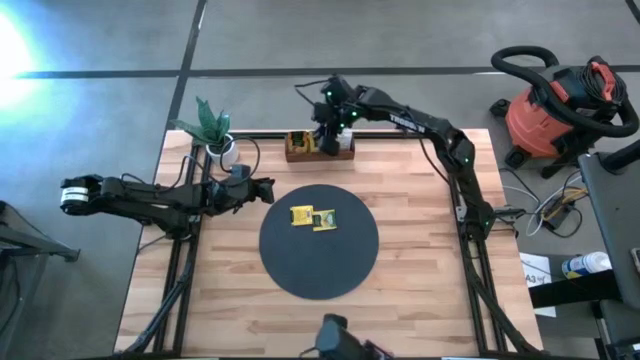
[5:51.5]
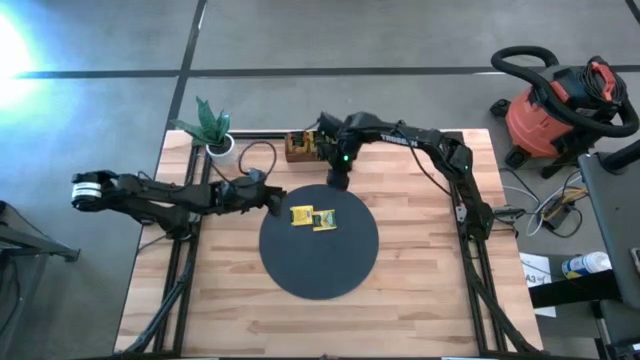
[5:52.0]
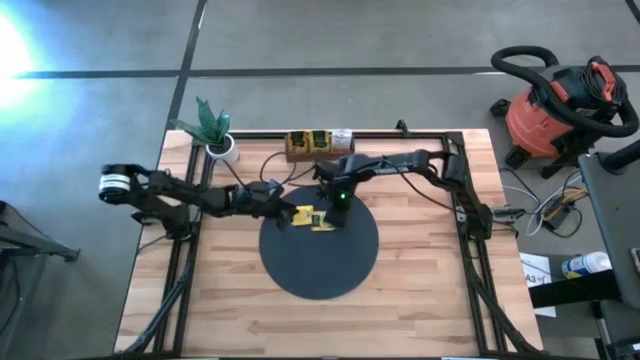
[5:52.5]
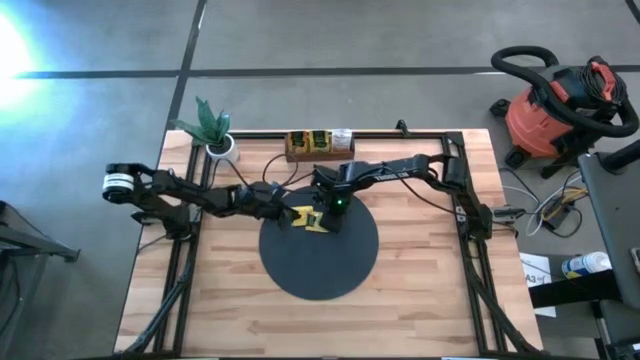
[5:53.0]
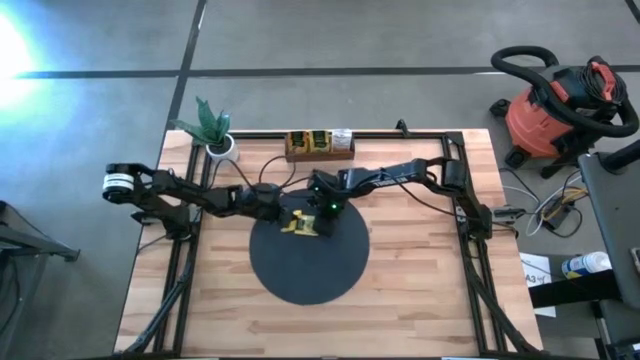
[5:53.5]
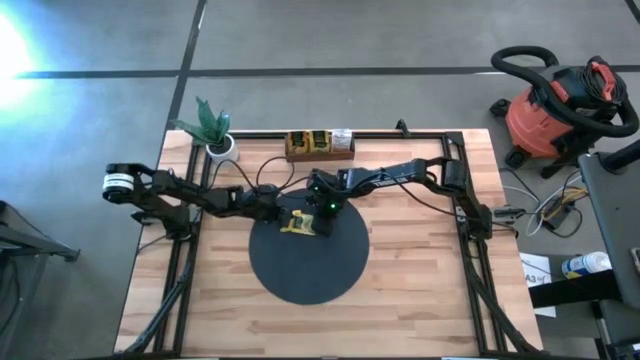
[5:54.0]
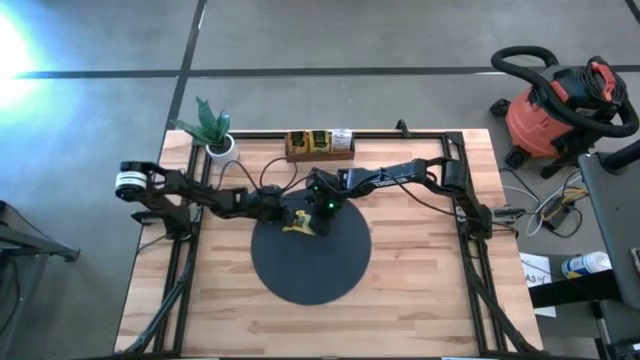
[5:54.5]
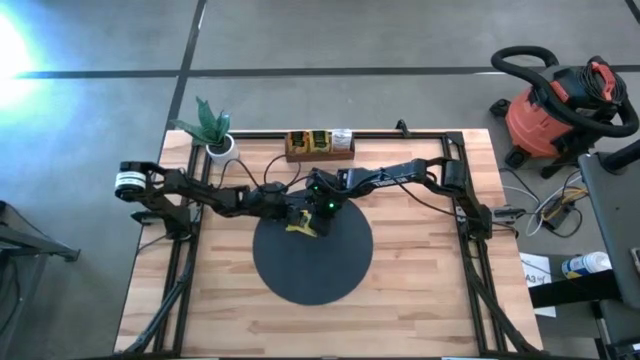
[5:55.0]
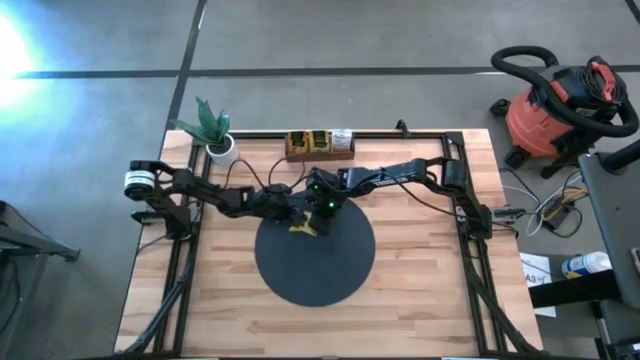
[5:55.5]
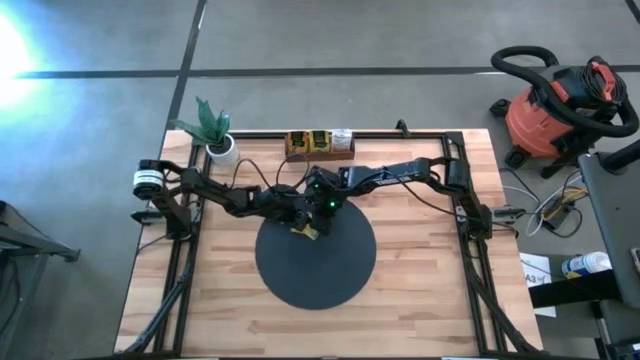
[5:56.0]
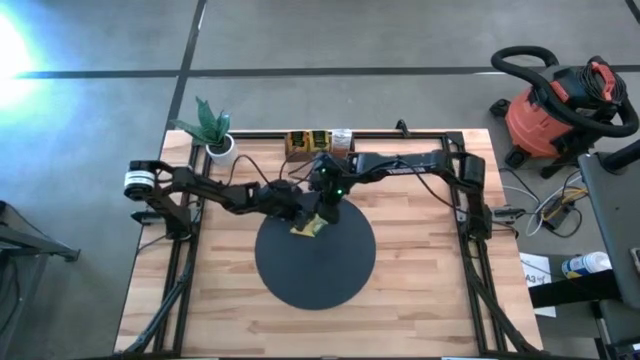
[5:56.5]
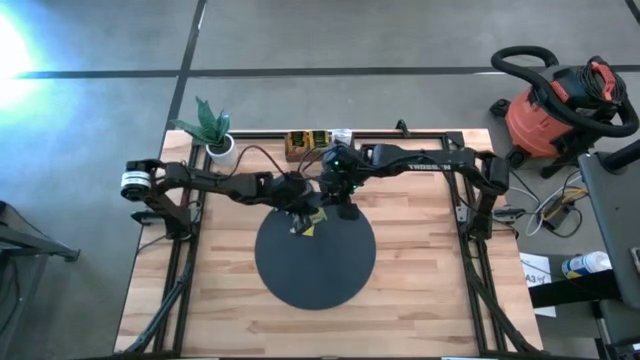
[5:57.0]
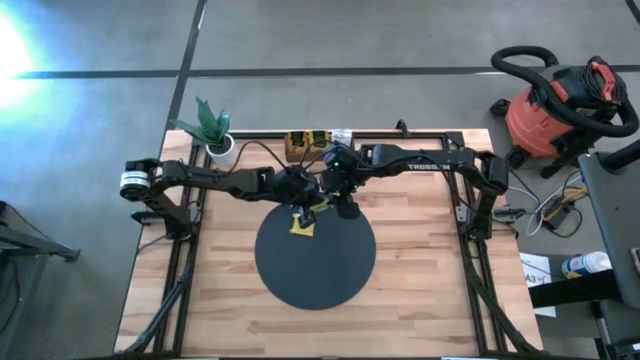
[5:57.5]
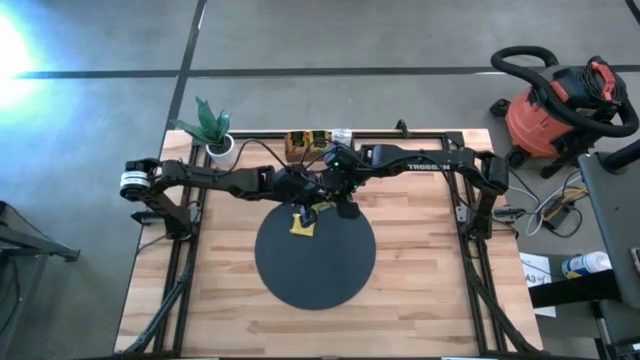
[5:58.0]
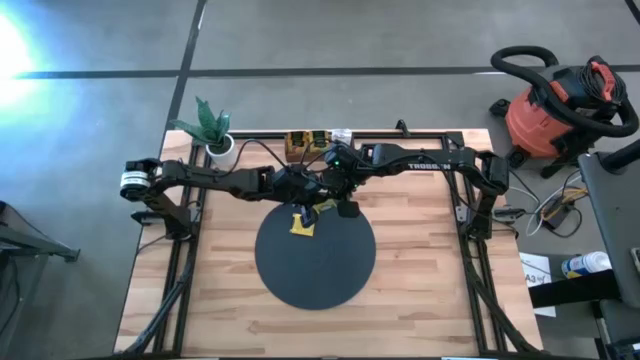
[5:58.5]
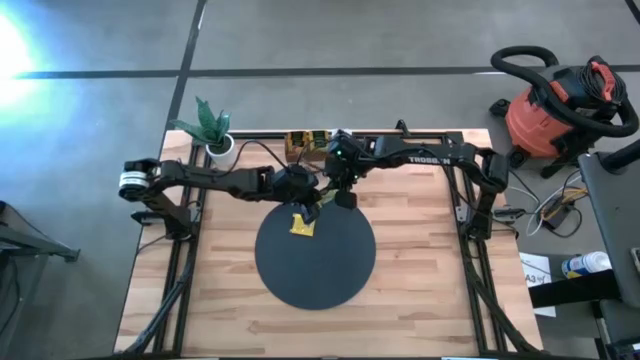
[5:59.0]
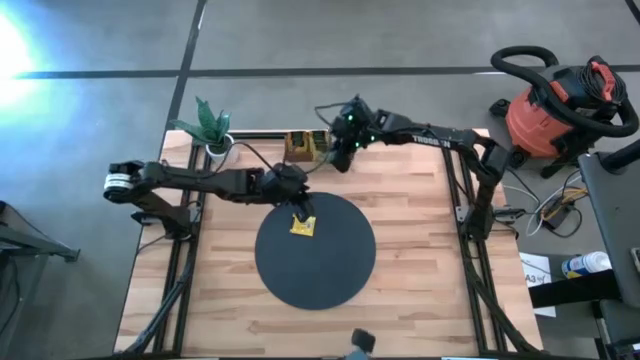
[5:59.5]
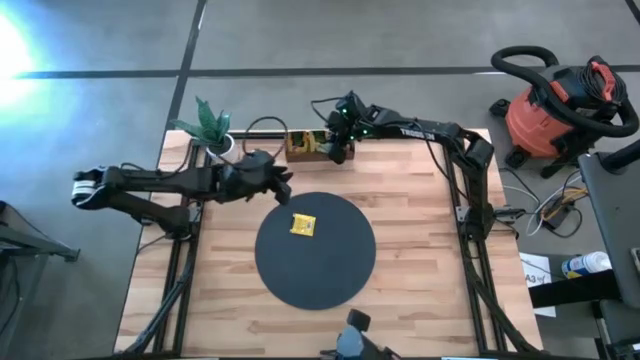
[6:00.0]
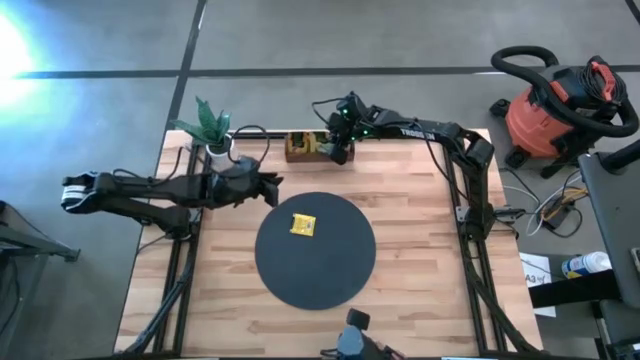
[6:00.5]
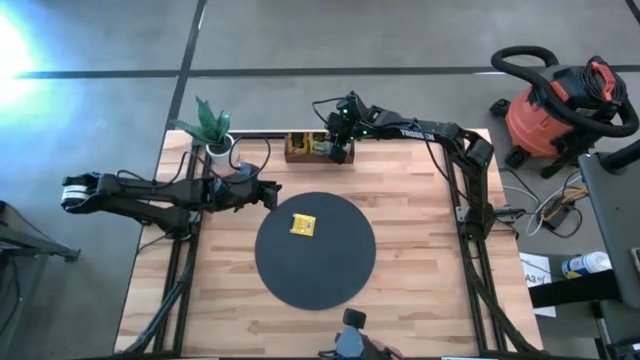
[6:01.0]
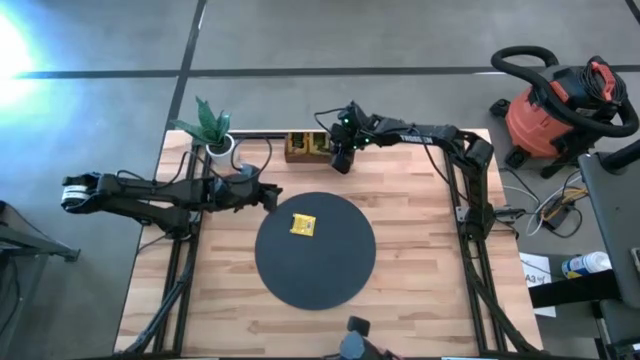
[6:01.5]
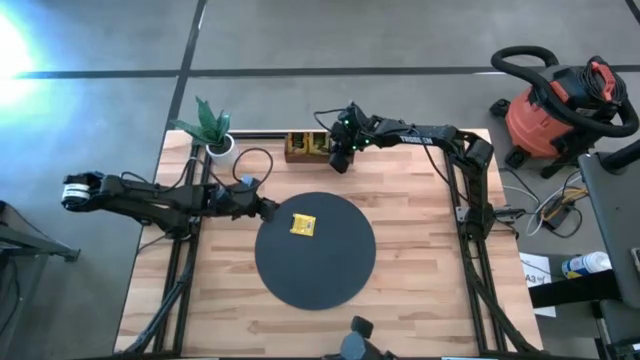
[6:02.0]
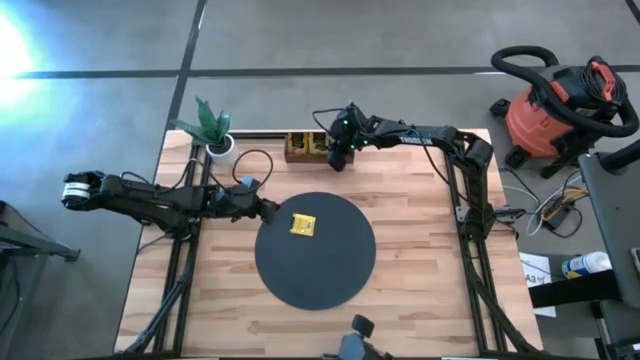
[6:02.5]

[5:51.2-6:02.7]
Task: Pick & Place Tea
Put the yellow tea bag into the middle section of the wooden organizer

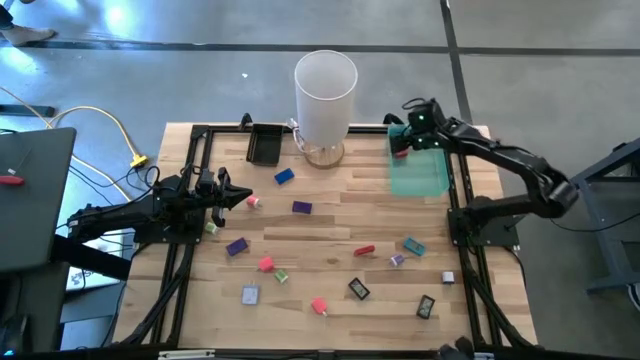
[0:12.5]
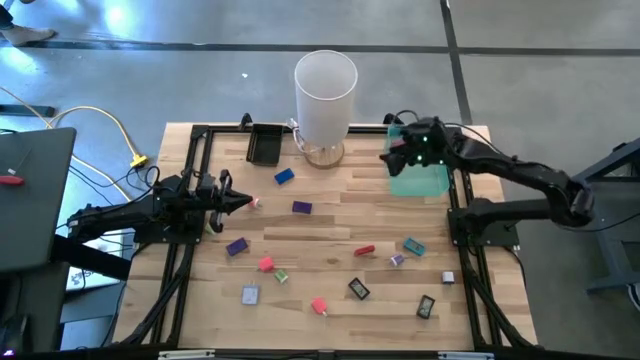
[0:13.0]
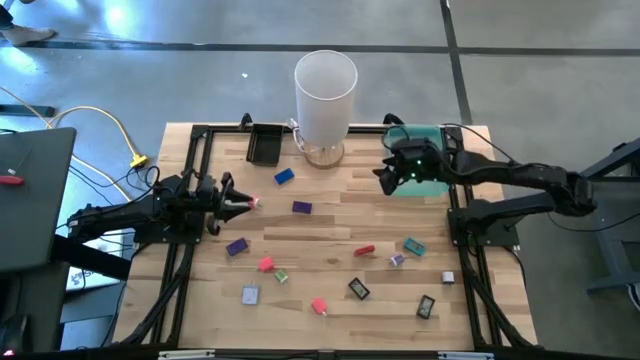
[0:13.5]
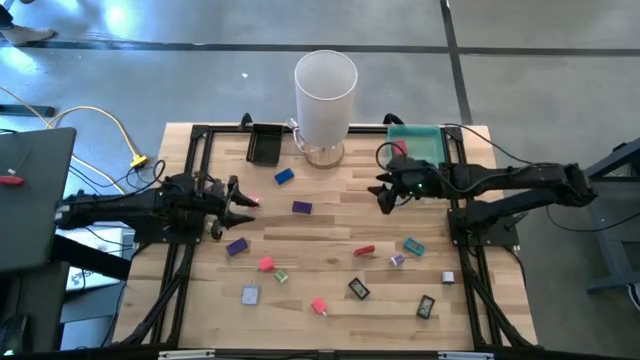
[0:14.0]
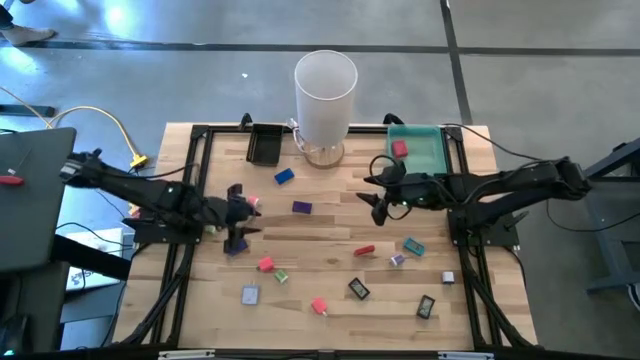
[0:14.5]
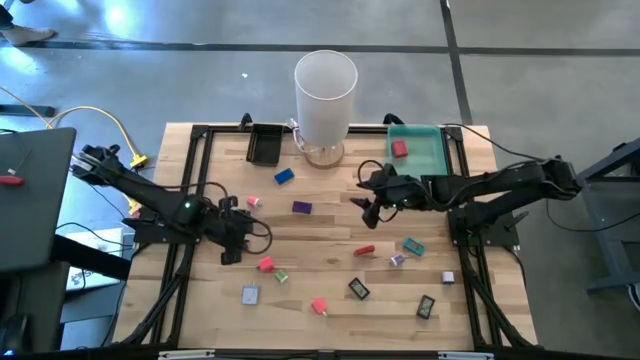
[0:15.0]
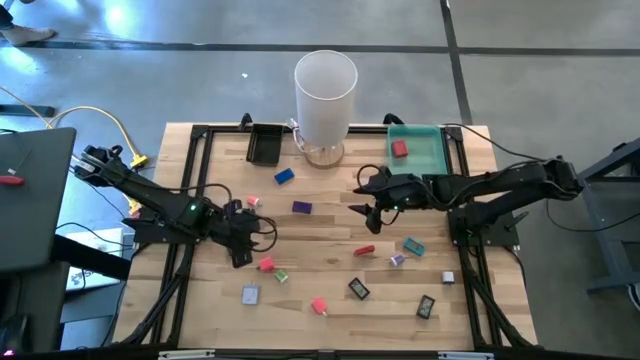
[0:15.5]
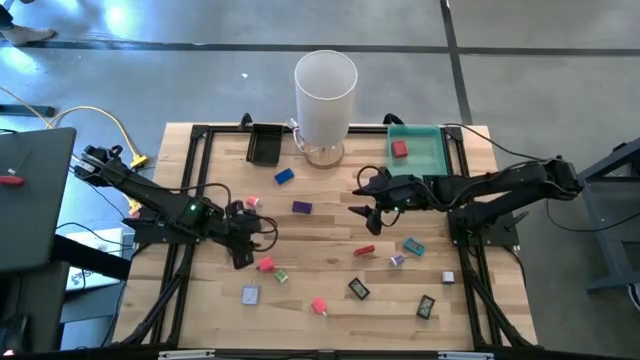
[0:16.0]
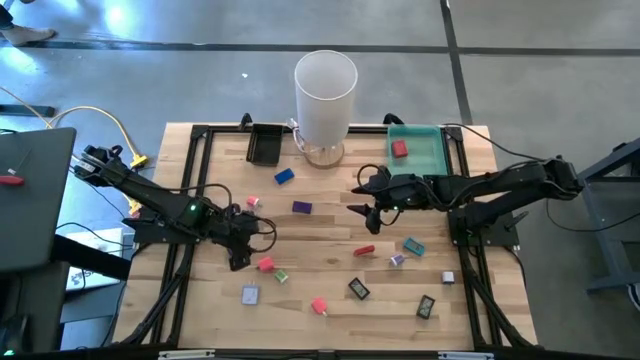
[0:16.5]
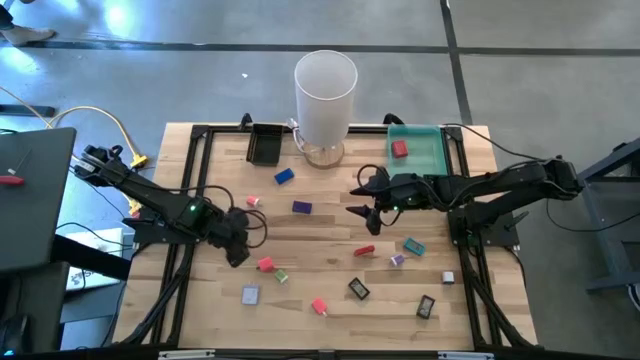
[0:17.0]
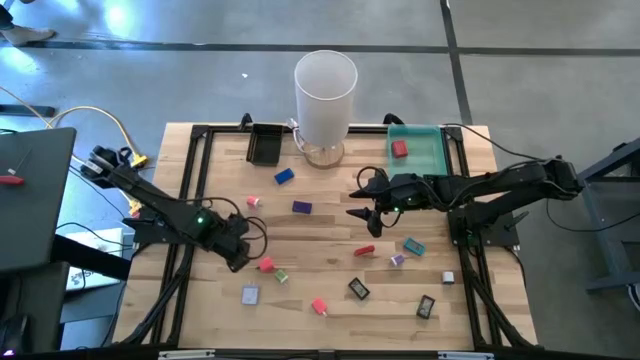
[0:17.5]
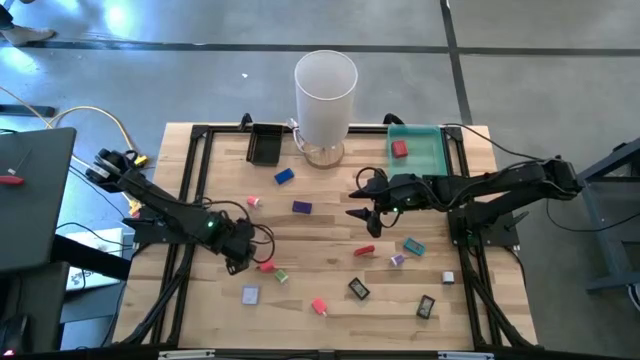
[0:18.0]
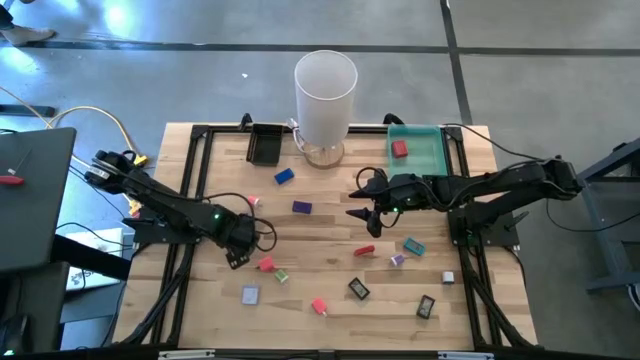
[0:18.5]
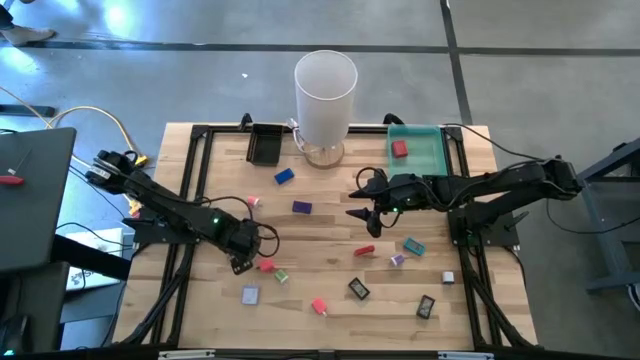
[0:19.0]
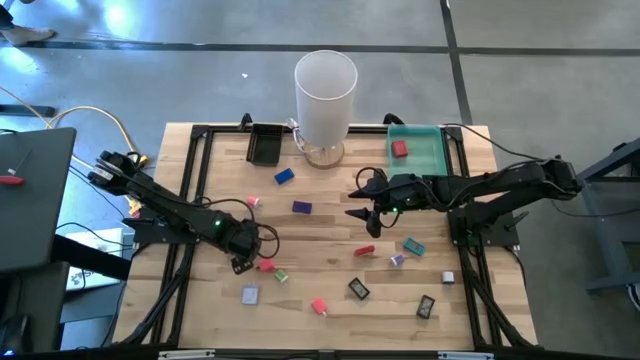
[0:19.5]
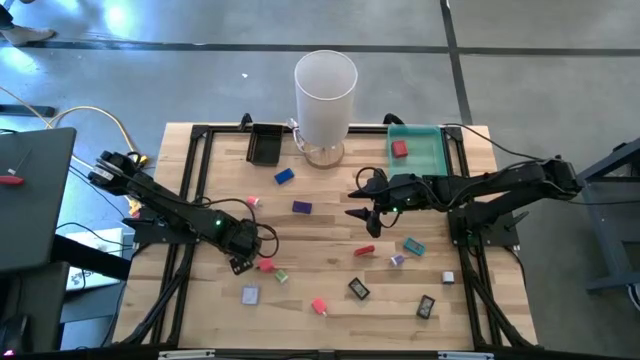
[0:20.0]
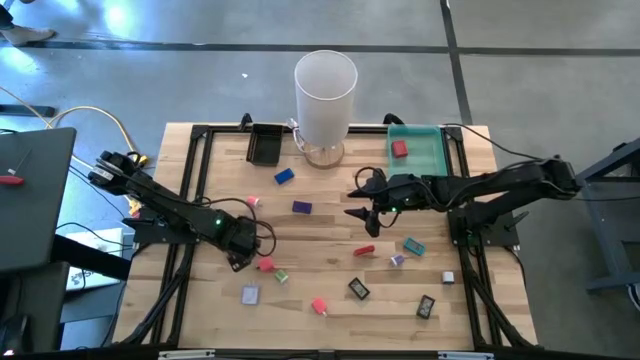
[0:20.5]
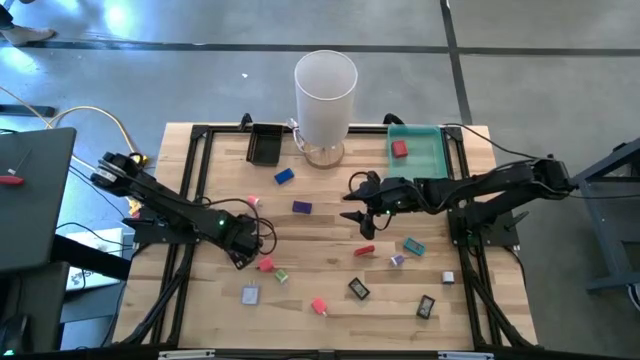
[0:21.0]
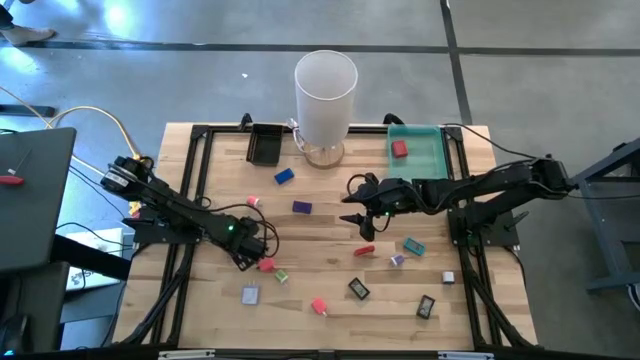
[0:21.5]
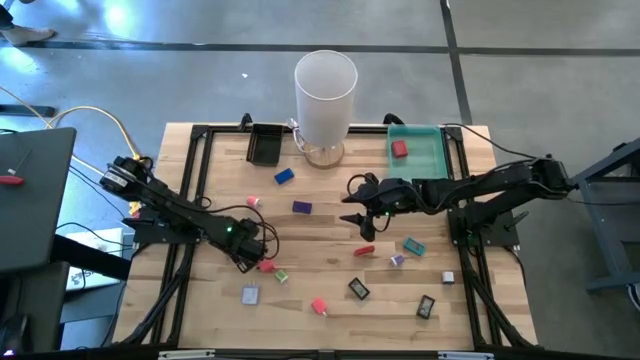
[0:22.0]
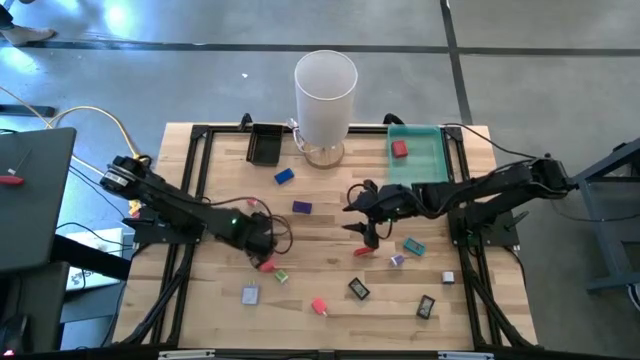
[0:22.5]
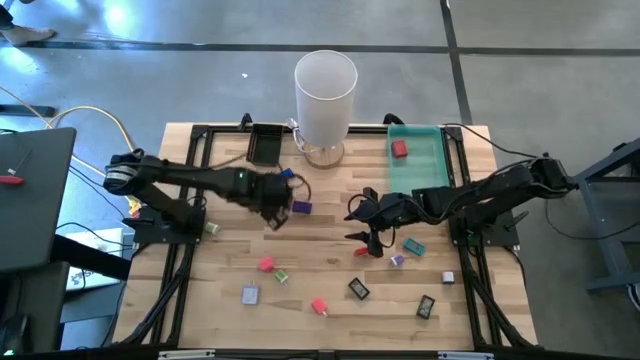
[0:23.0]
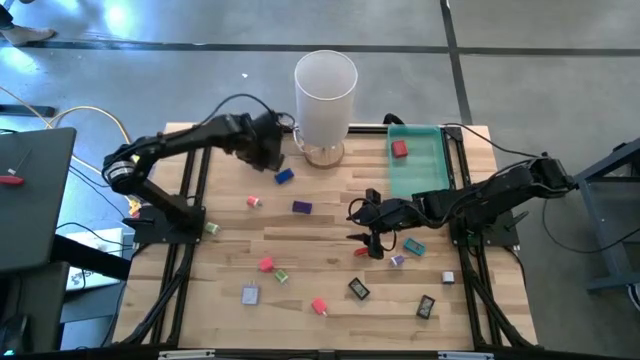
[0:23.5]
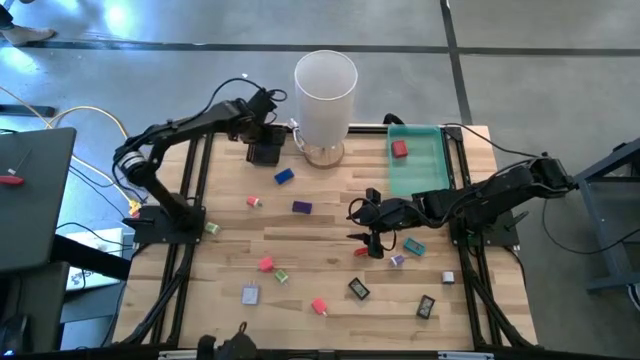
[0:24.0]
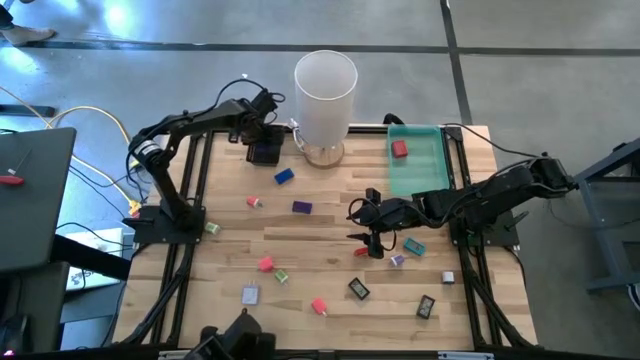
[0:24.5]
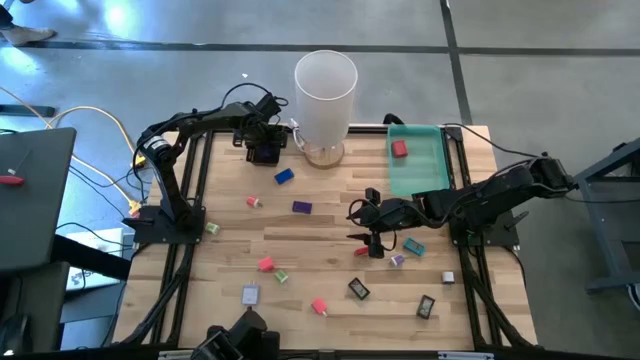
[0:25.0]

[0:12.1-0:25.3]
Task: Pick & Place Office items
Put the purple digital clock into the black bin
